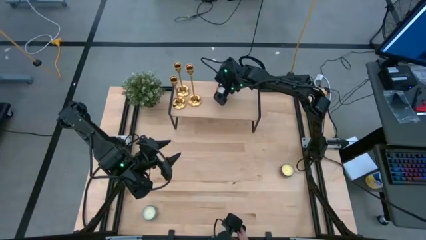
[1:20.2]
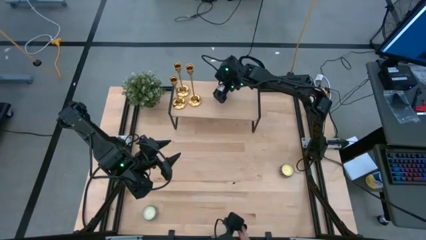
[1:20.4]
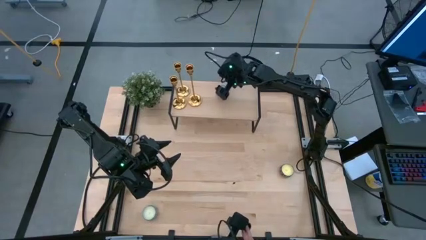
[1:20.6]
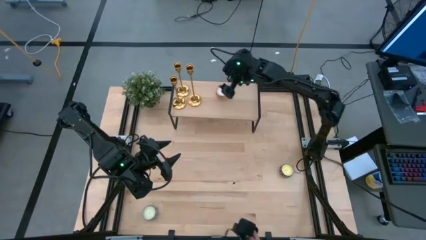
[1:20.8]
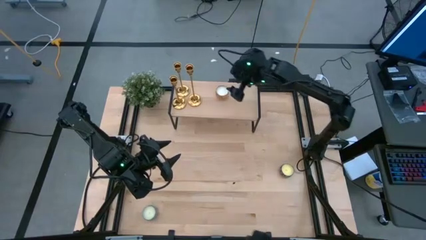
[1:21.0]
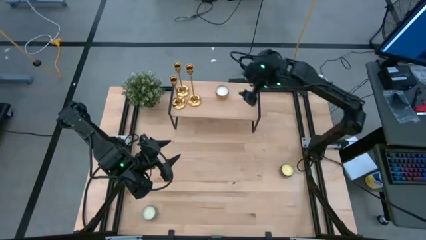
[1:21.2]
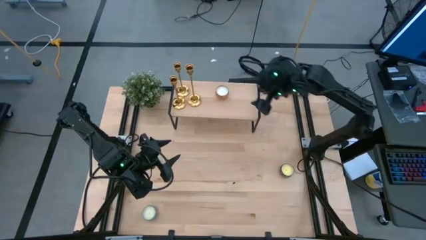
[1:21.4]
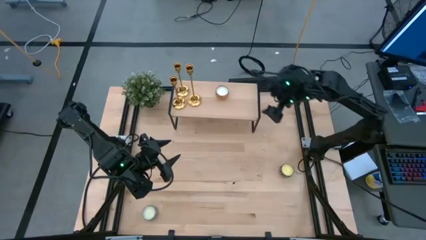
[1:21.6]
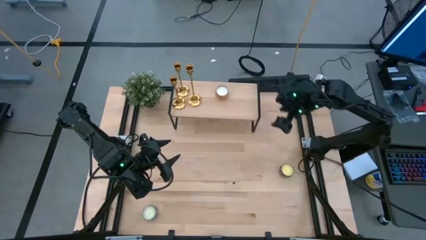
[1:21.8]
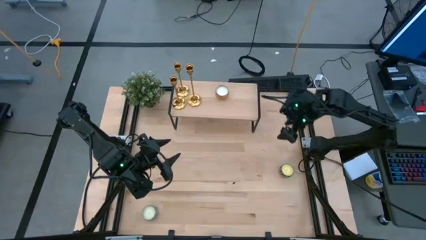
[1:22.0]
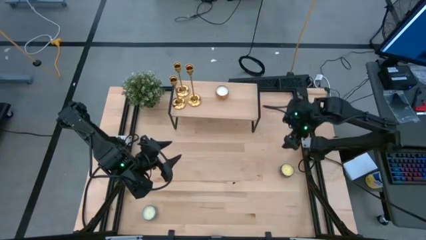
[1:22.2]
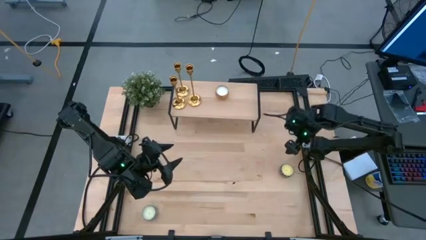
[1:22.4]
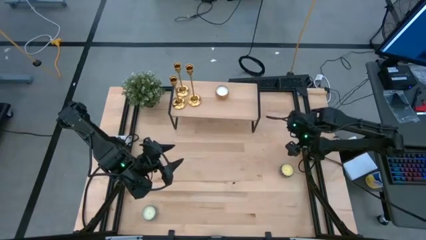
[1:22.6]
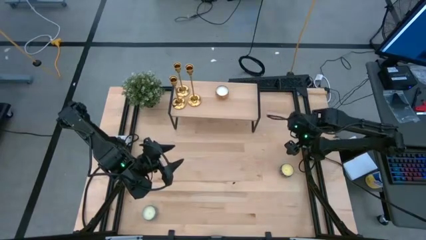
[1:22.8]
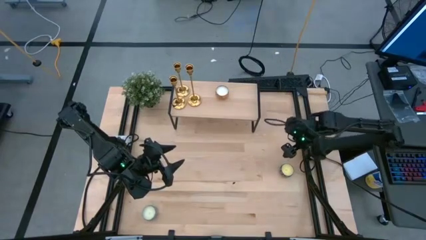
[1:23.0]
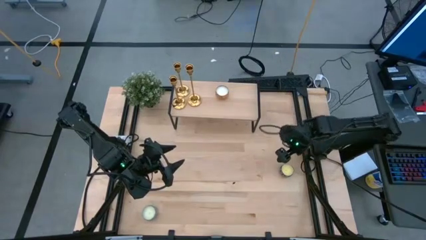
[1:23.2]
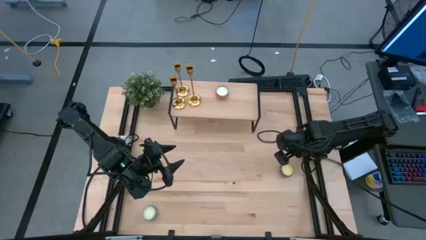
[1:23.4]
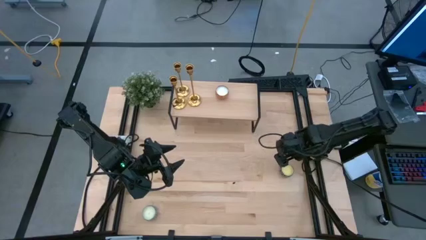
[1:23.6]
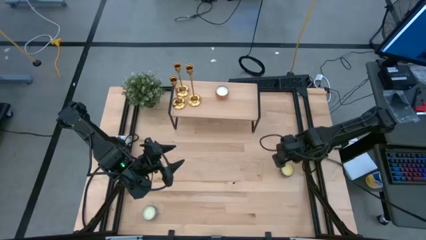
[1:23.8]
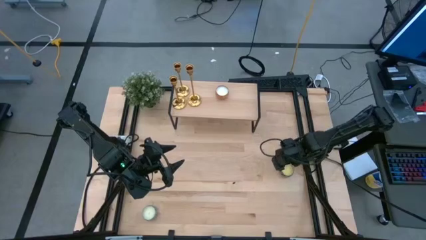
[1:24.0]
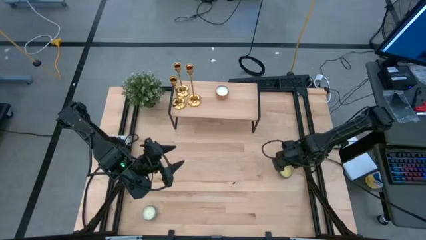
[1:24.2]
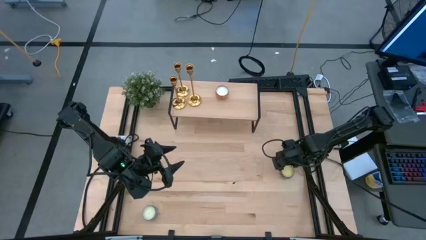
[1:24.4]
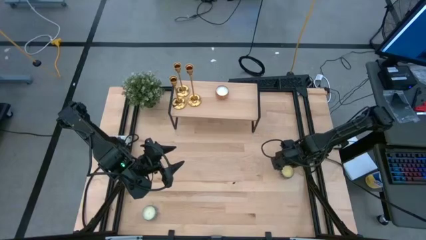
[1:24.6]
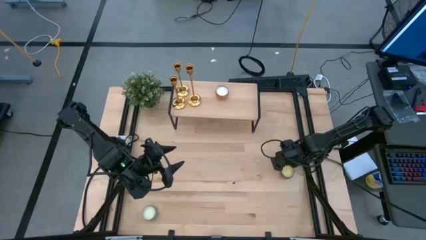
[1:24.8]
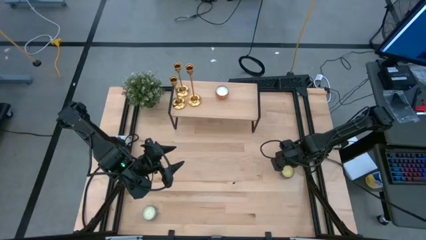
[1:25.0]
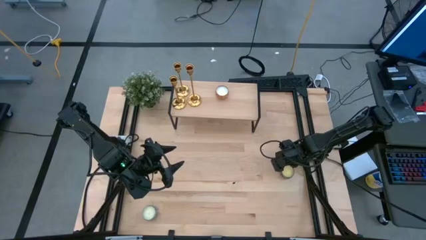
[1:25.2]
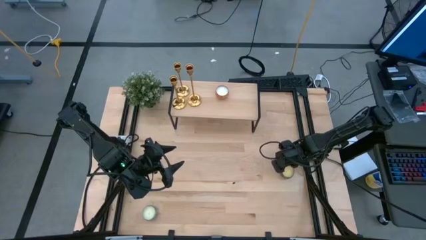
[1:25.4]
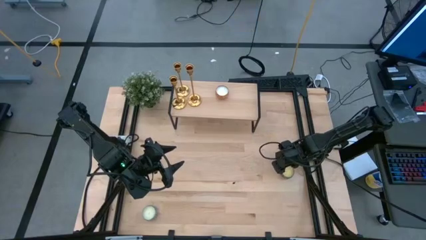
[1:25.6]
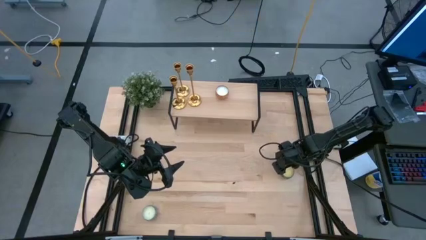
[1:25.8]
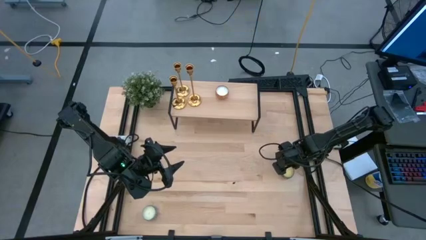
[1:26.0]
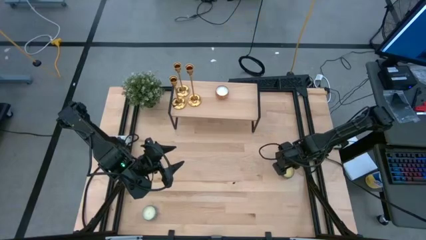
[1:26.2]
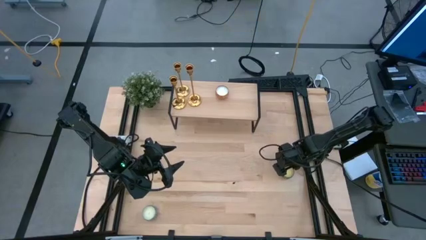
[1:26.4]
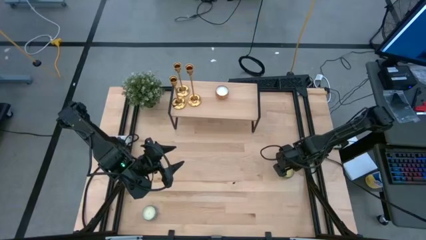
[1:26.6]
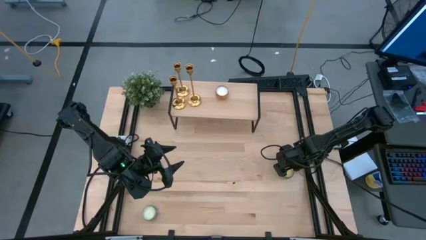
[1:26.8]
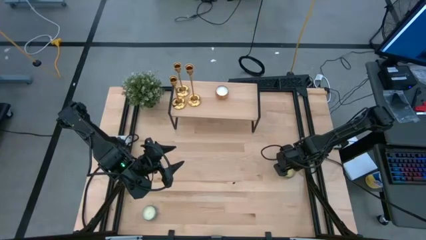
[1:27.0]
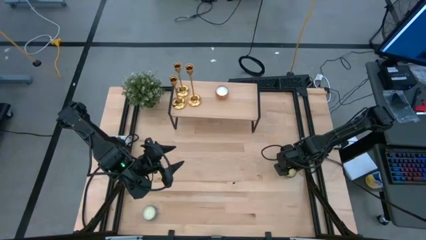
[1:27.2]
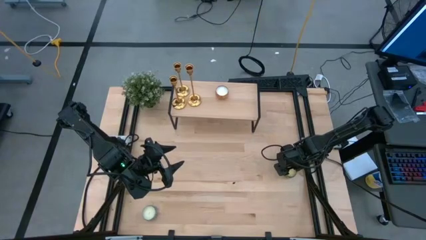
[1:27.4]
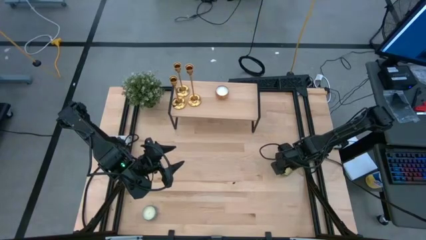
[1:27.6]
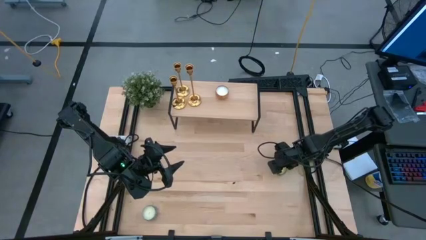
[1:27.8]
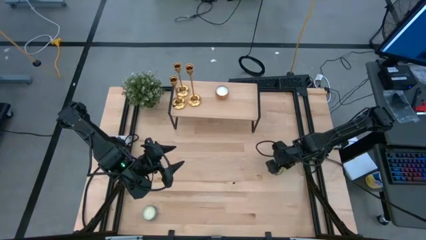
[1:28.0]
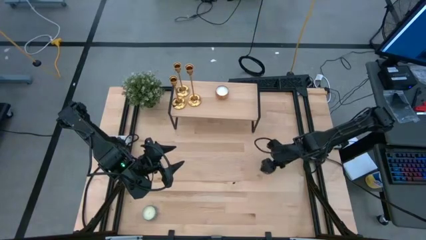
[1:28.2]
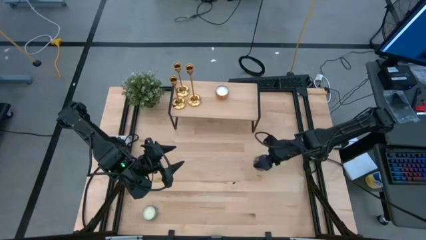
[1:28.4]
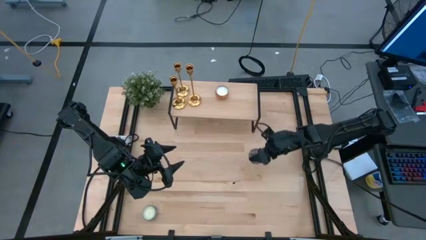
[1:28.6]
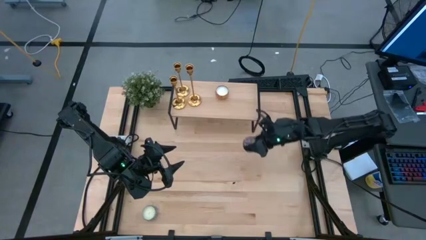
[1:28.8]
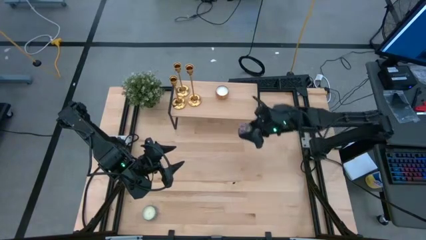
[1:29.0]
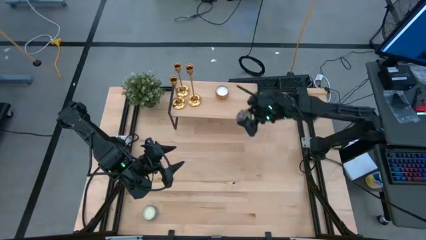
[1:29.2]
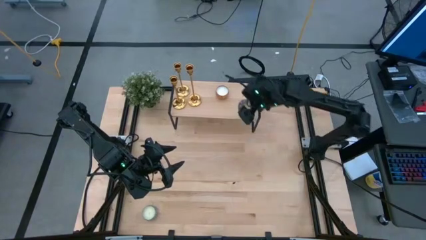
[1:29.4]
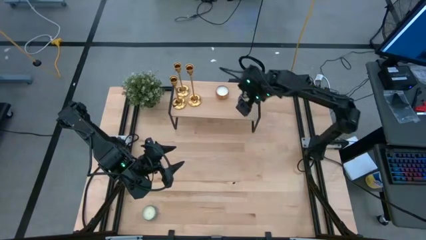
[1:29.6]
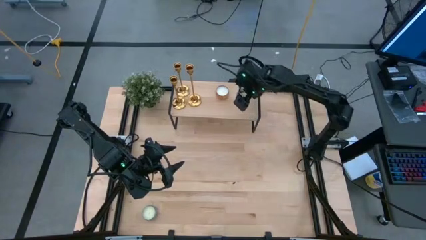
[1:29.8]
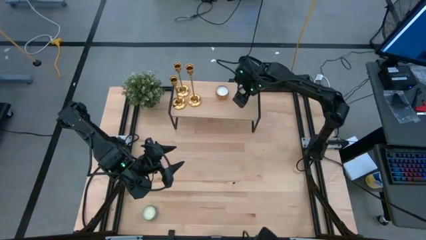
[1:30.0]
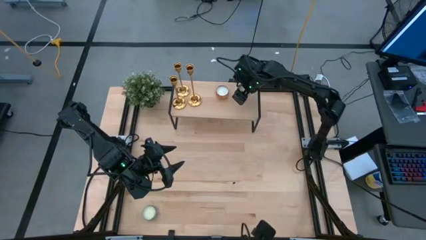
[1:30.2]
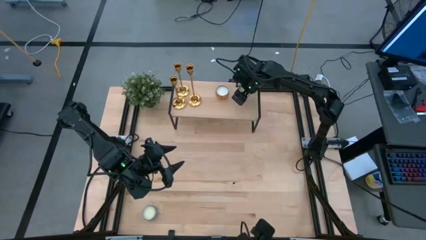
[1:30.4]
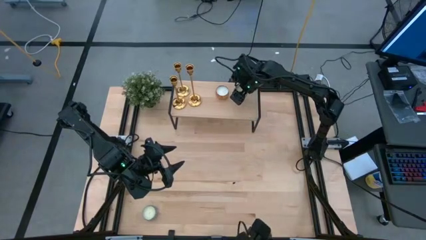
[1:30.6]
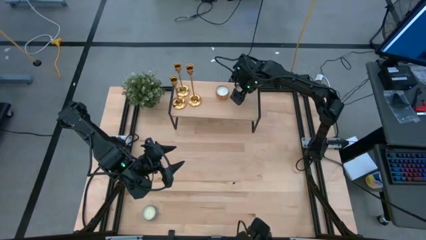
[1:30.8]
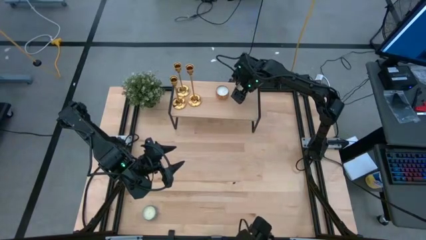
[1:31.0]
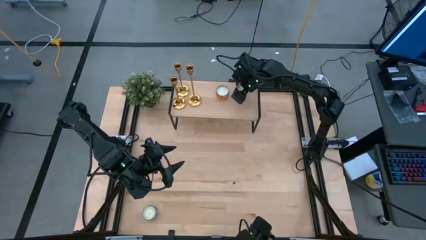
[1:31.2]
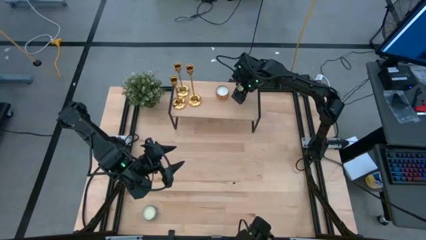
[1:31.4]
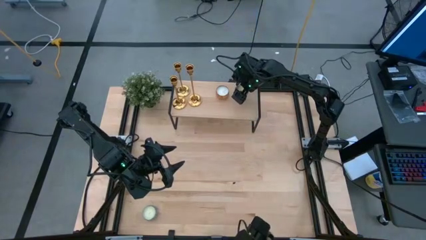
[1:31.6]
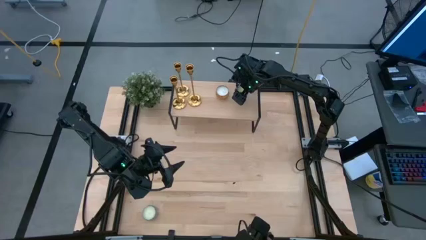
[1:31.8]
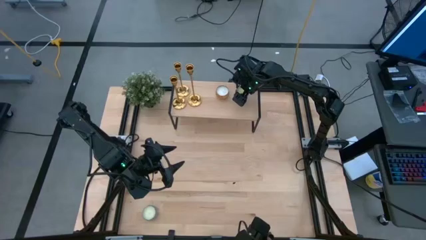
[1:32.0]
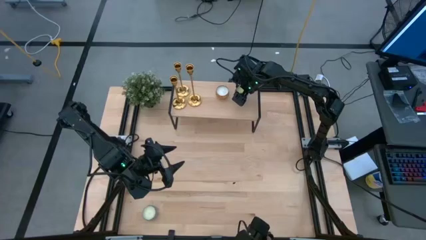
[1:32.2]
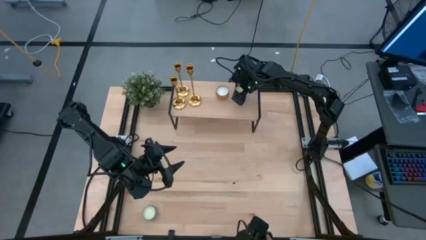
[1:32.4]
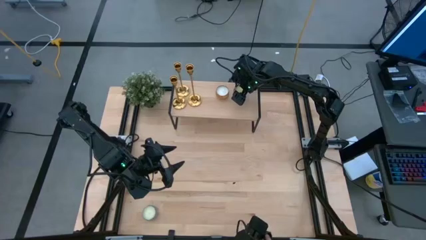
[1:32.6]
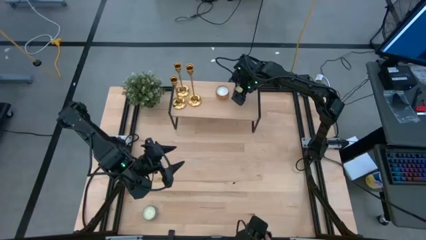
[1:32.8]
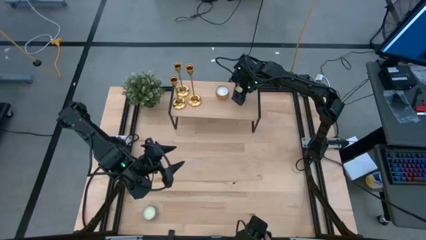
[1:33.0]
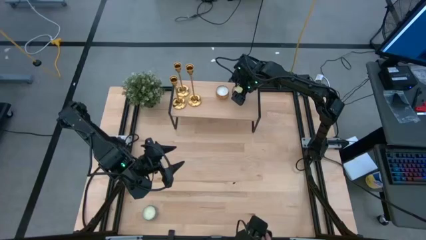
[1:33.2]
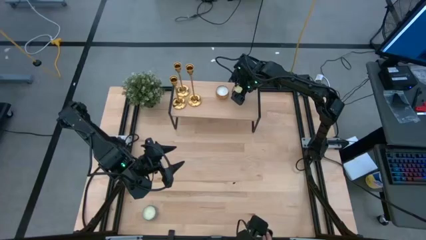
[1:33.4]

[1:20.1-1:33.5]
Task: Pick & Place candle stick holders
Put the red scented candle on the shelf

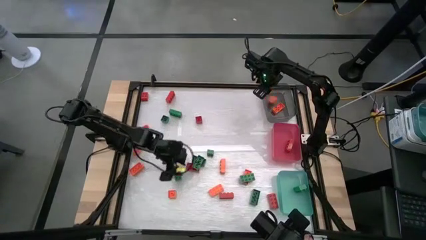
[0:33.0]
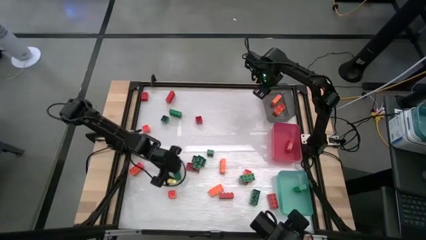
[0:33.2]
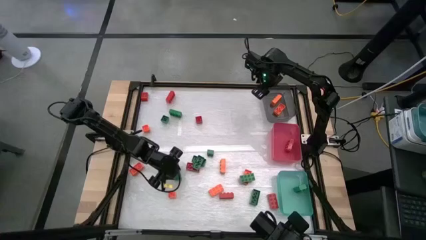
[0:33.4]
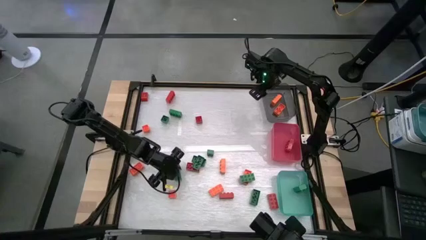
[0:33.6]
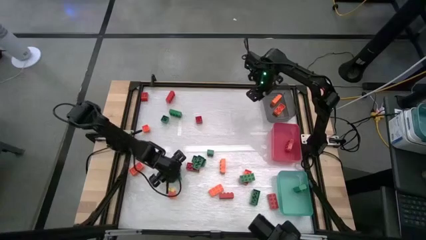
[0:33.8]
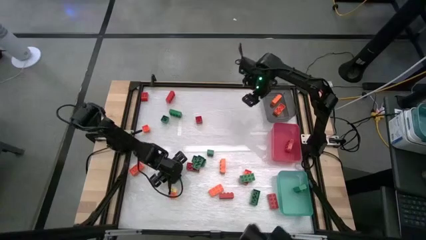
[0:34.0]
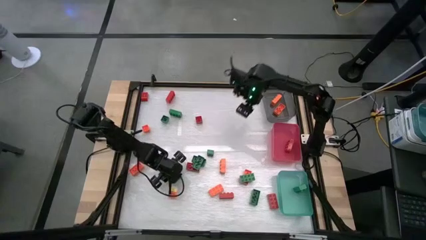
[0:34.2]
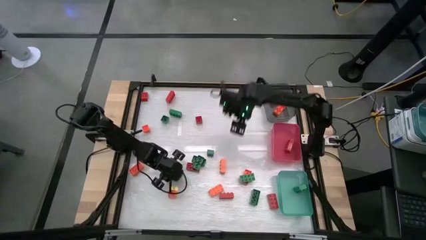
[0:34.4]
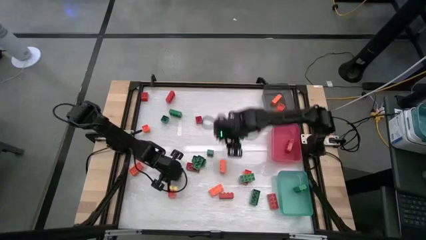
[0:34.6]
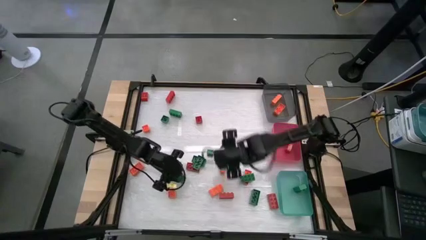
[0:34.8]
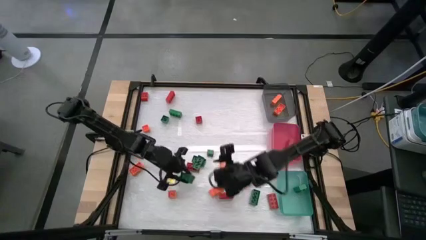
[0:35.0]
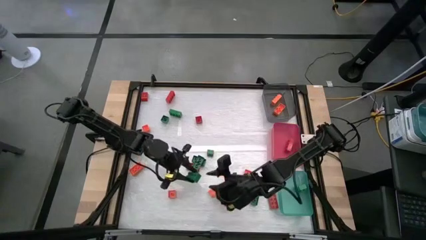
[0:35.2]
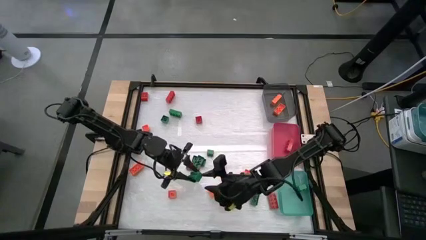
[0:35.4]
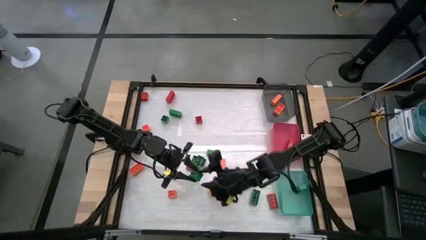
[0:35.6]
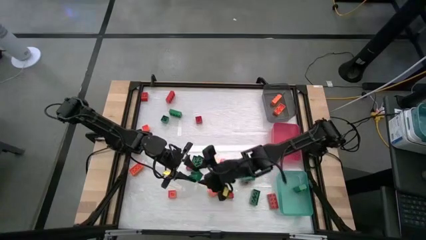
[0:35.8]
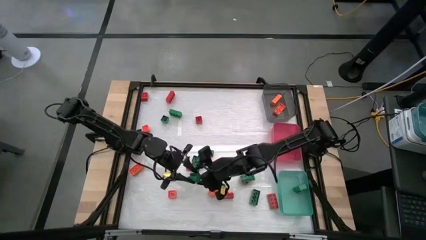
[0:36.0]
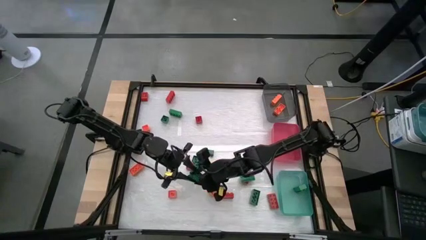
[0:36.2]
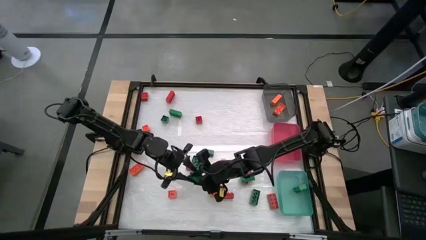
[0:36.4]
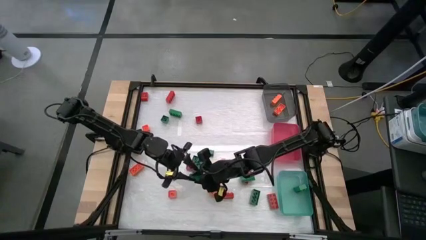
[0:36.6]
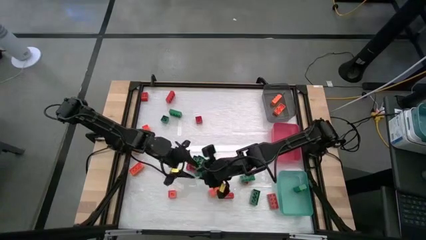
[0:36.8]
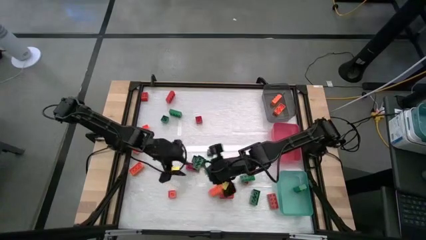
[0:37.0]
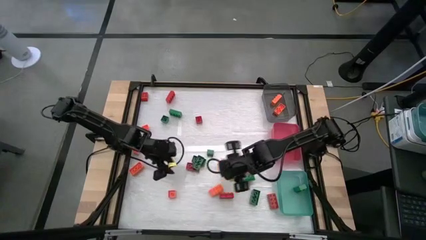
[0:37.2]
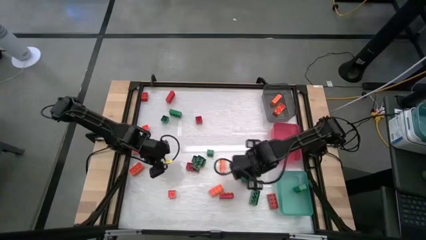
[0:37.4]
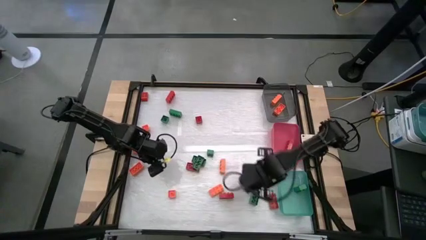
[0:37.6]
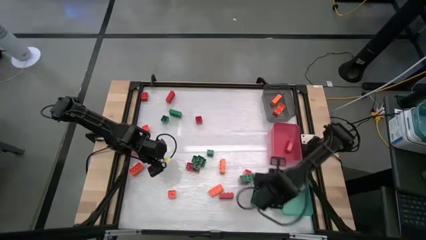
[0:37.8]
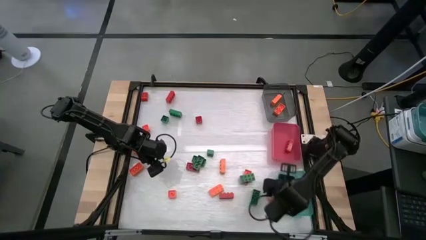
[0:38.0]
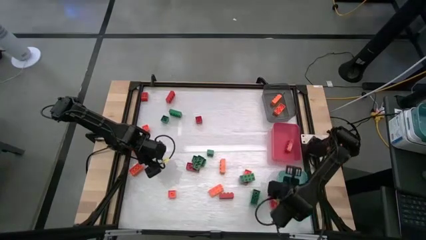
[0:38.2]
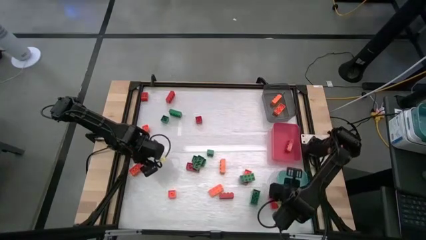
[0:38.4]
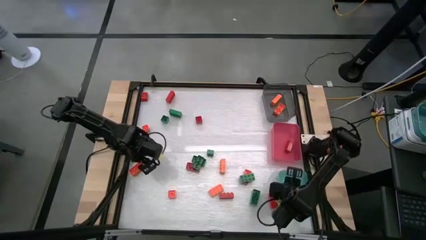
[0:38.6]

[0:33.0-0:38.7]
Task: Sort blocks
Put the green game piece into the blue bin
